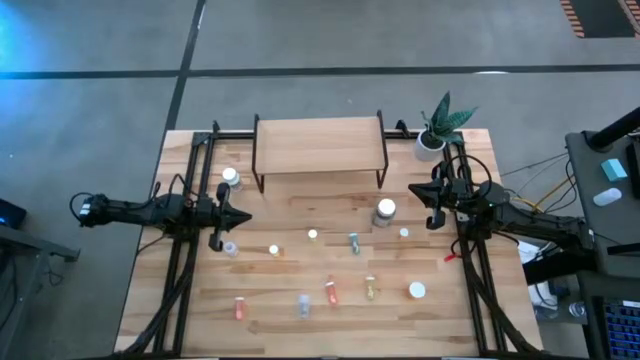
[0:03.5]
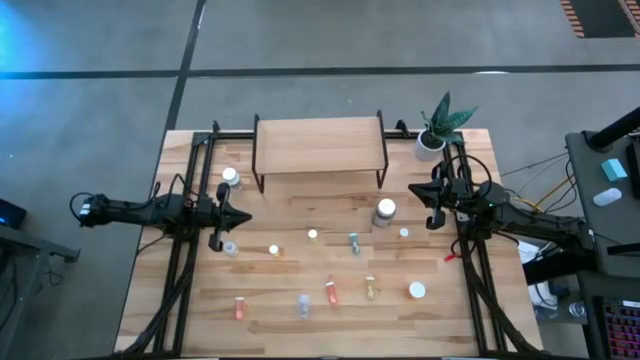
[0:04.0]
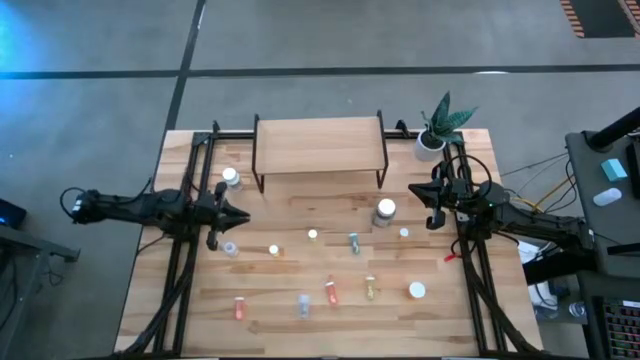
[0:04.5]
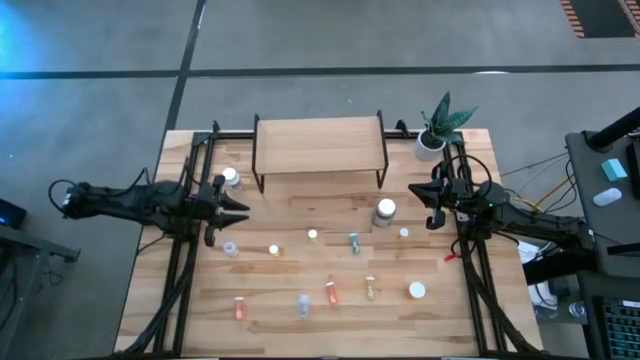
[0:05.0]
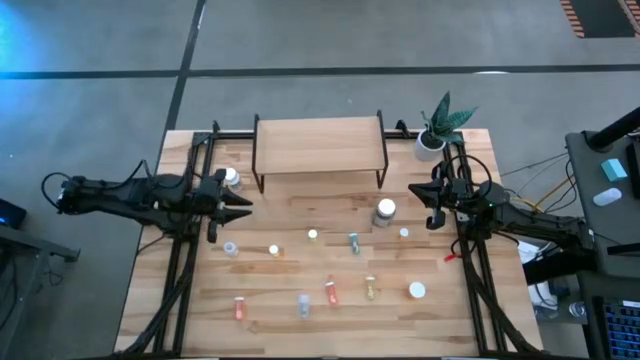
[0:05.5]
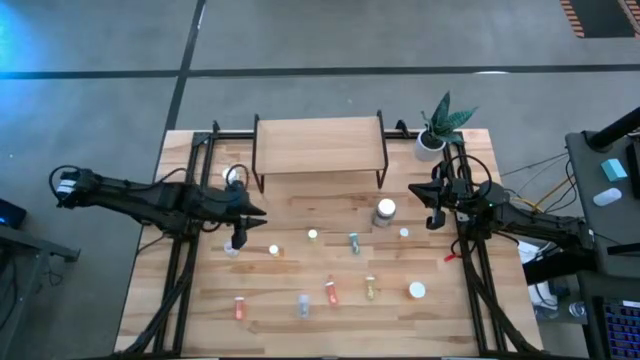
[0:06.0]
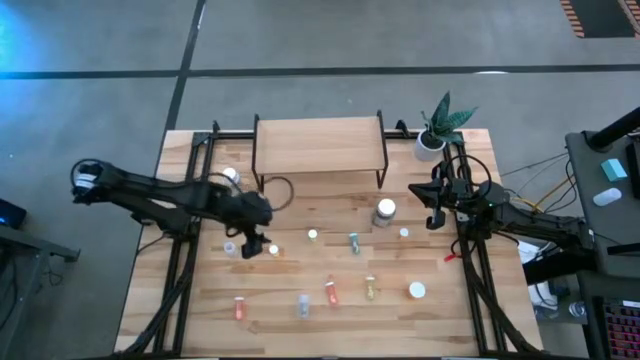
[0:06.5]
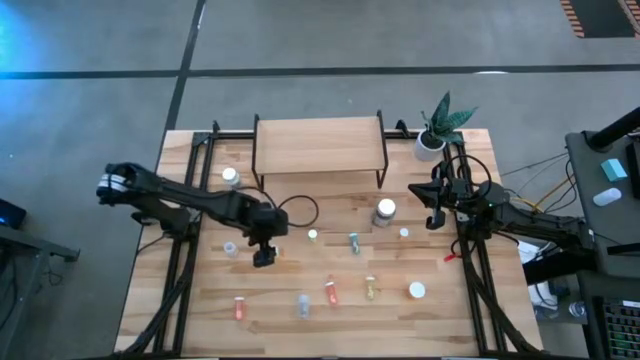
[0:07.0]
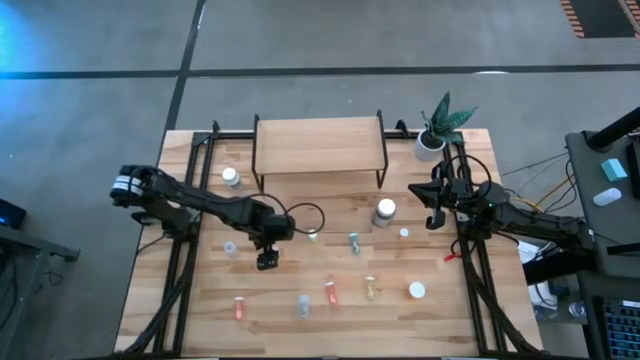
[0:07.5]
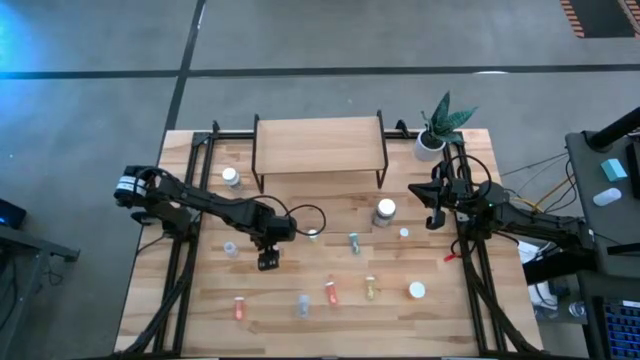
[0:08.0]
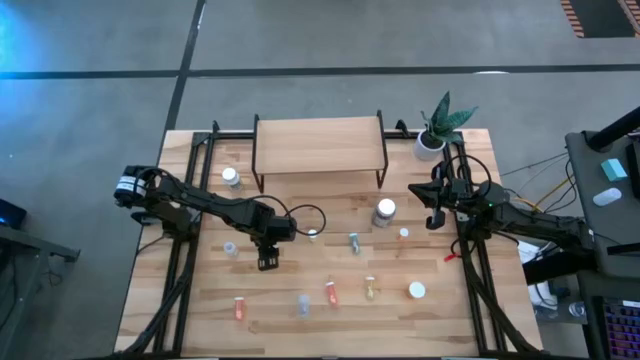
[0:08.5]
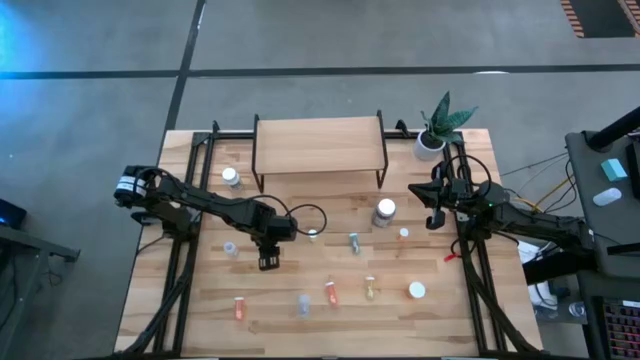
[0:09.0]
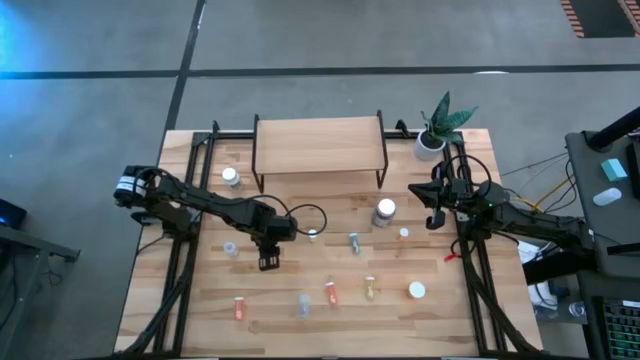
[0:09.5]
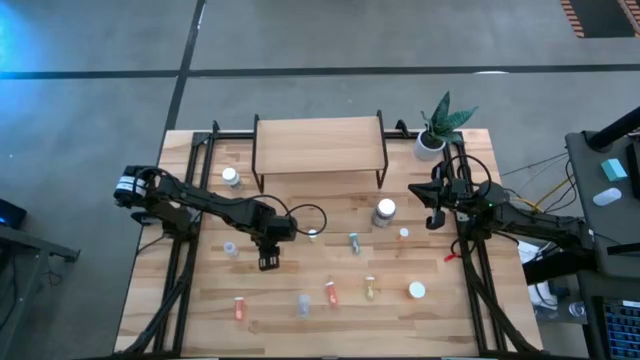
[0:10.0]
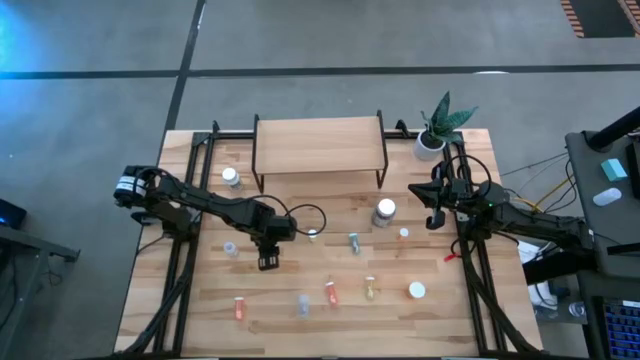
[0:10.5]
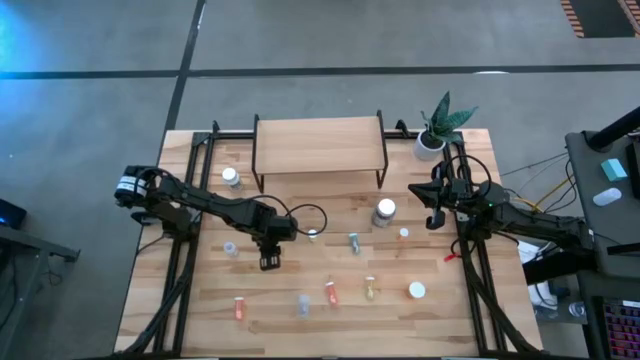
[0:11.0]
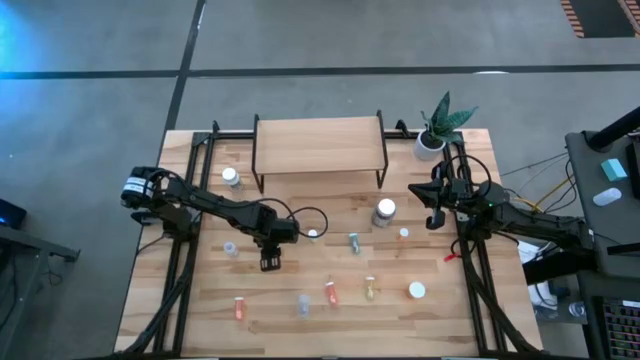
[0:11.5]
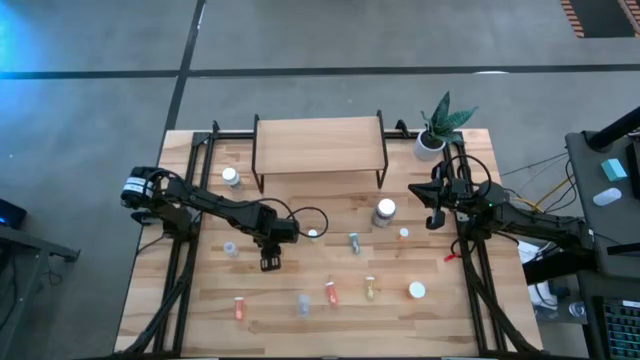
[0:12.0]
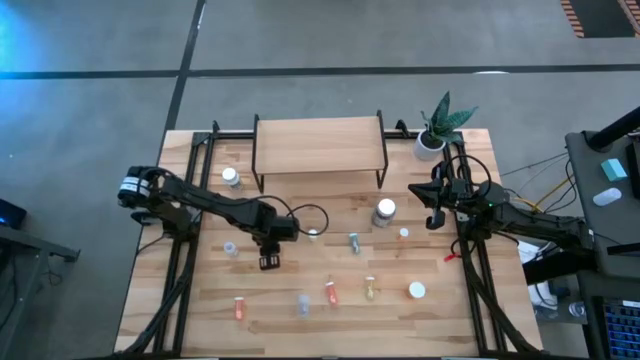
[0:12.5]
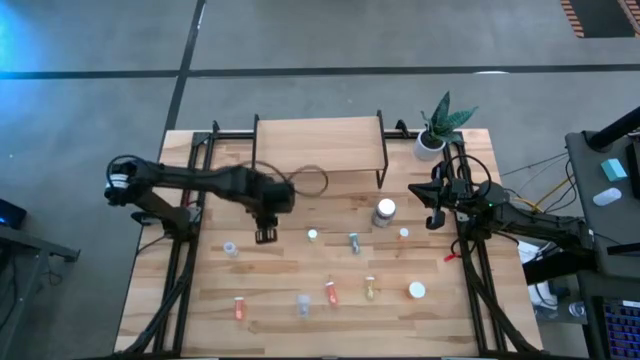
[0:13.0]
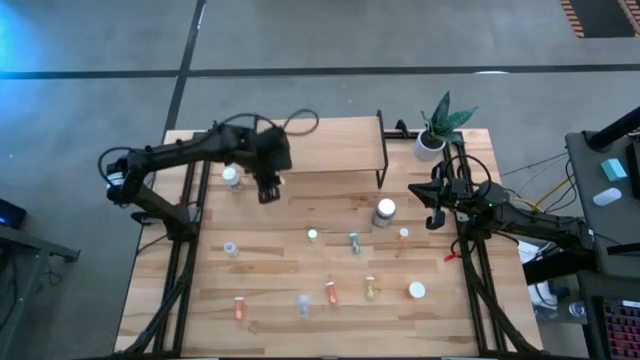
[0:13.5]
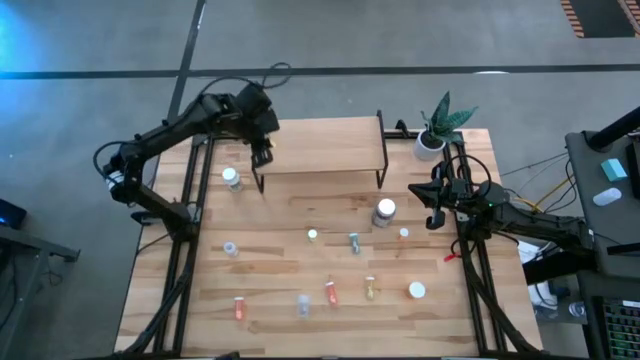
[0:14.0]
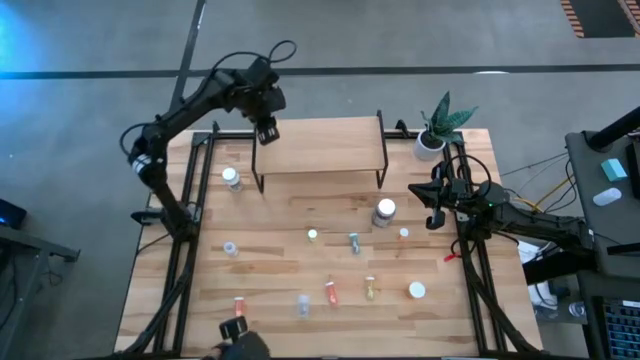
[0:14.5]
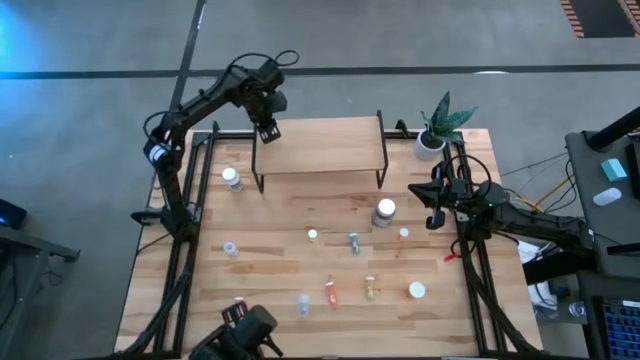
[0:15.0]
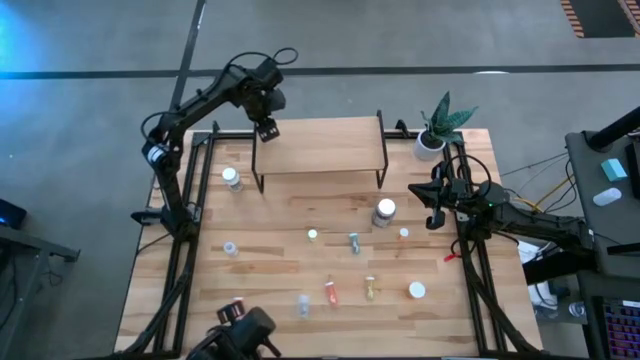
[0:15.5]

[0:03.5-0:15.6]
Task: Pick and place medicine bottles onto shelf by color
Put the yellow pill bottle on the shelf

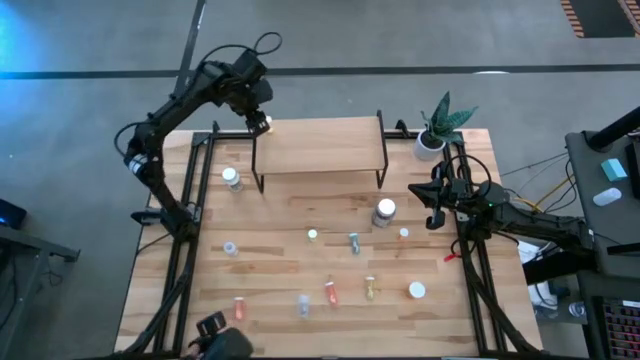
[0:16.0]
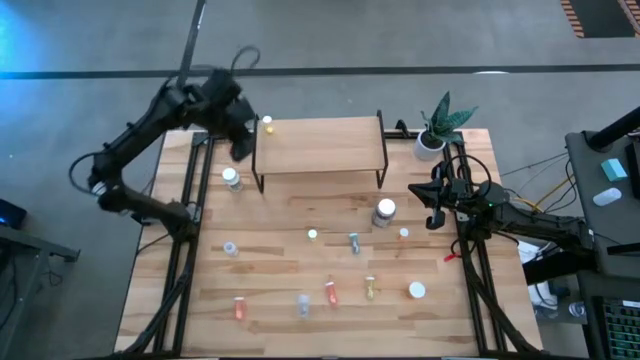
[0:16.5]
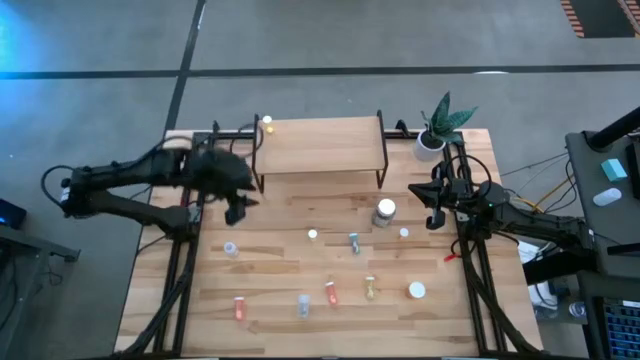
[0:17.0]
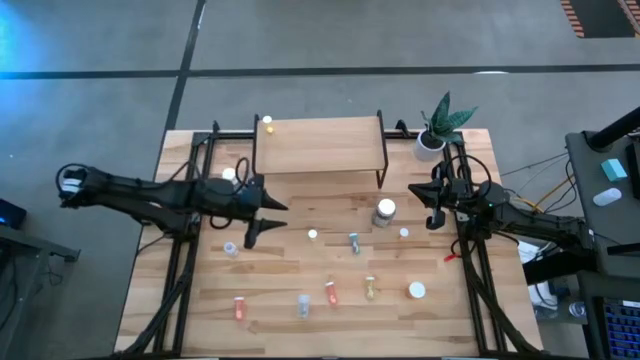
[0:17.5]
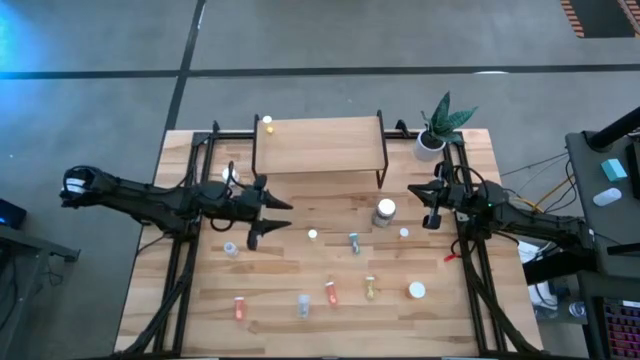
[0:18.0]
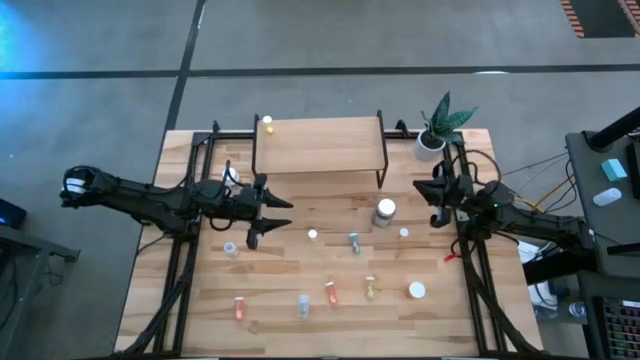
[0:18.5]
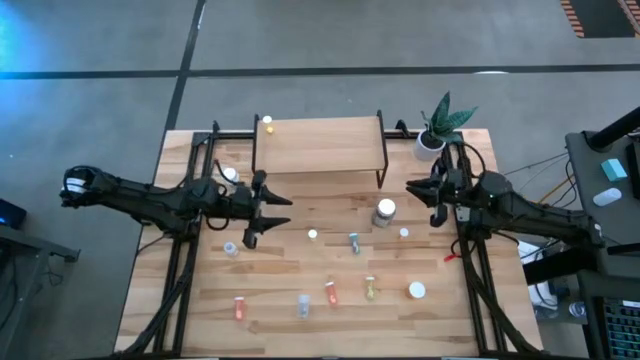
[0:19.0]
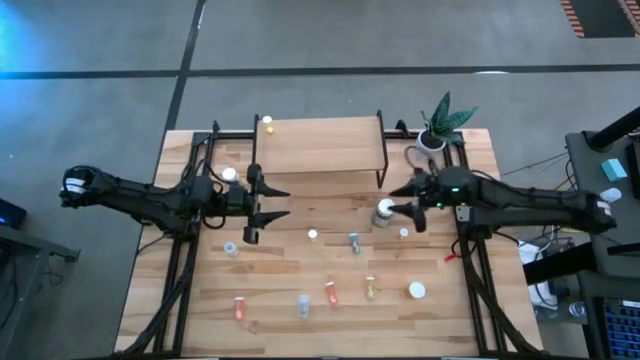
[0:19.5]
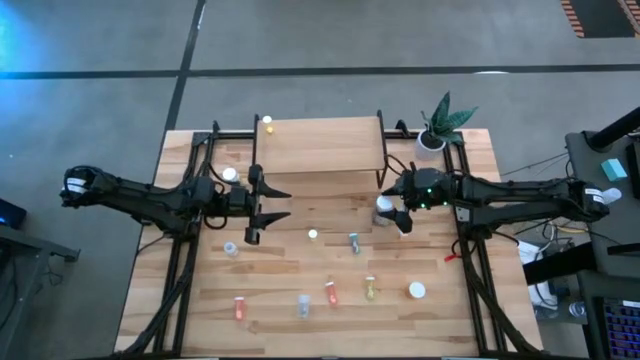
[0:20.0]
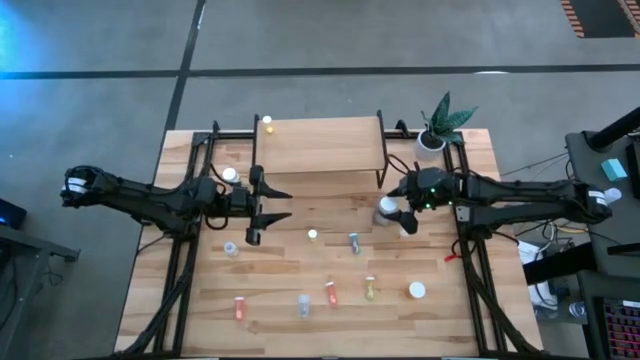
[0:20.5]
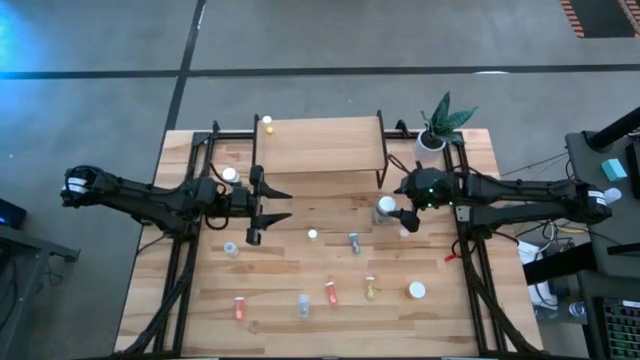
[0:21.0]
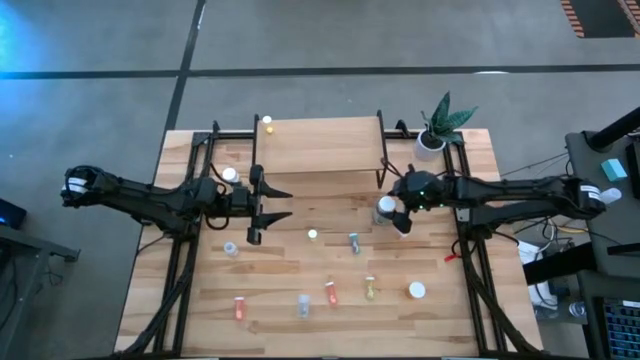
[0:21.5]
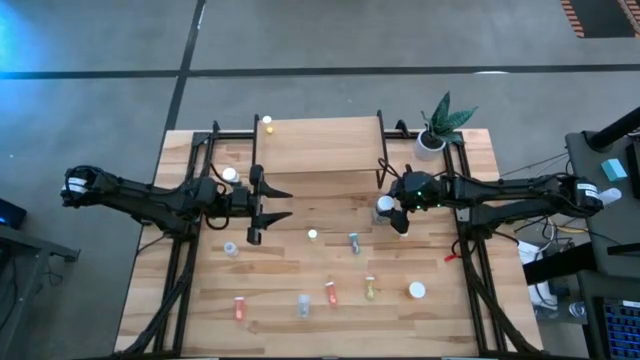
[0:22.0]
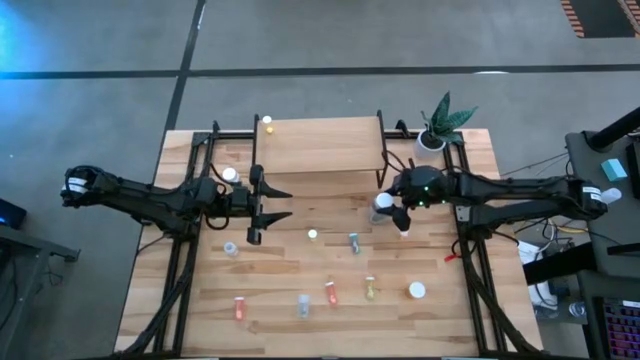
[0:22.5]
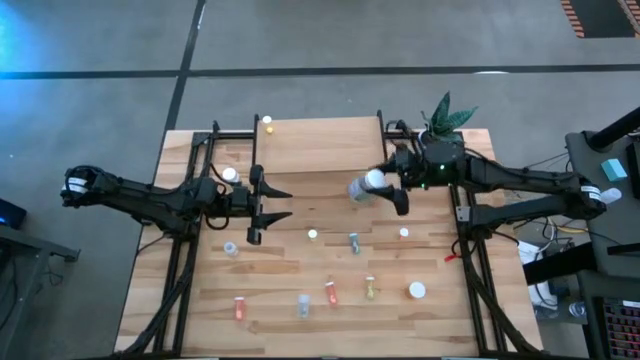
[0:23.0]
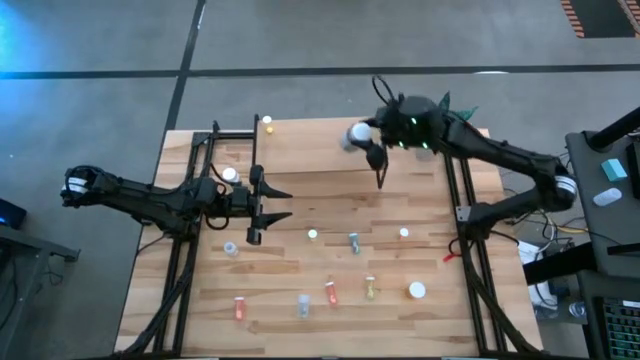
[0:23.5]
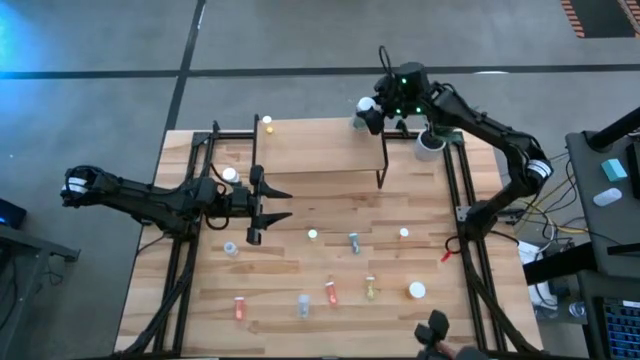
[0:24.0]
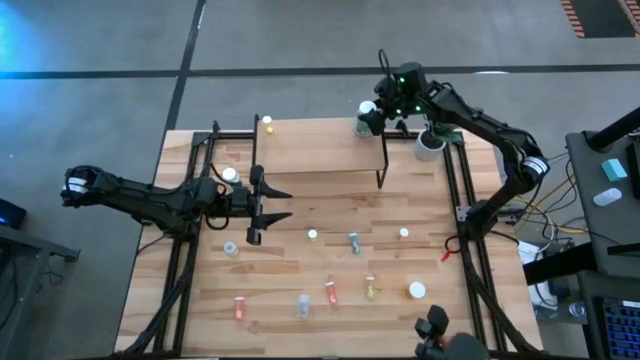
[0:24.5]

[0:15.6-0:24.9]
Put the transparent medicine bottle on the shelf
